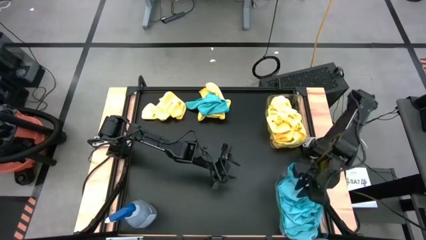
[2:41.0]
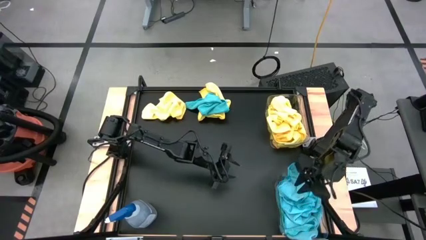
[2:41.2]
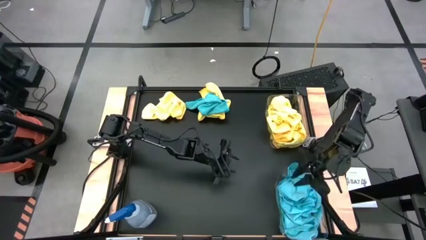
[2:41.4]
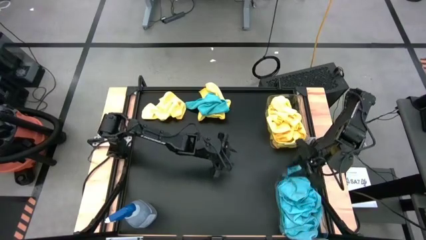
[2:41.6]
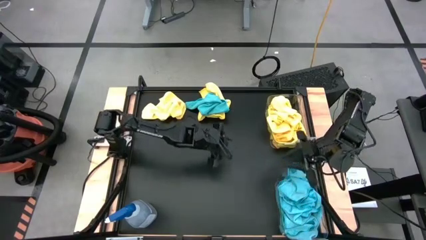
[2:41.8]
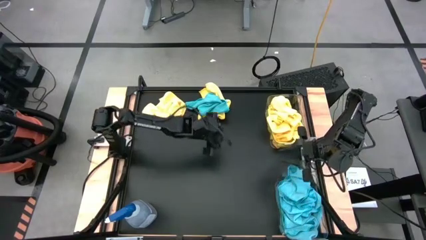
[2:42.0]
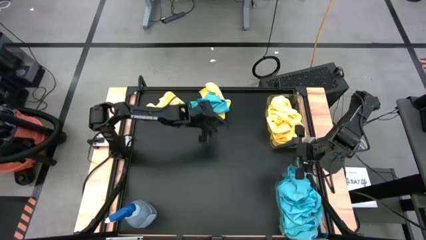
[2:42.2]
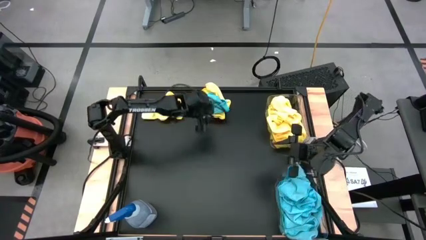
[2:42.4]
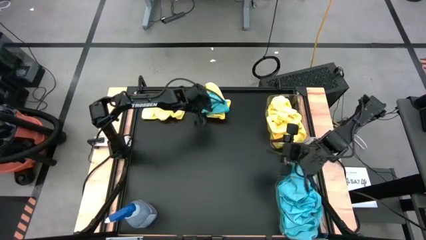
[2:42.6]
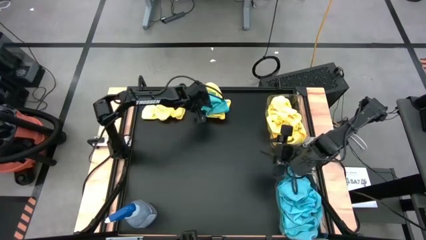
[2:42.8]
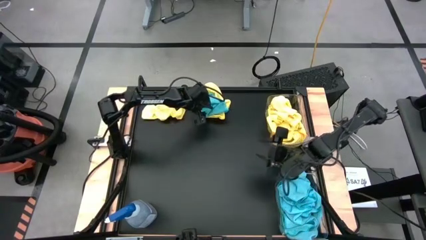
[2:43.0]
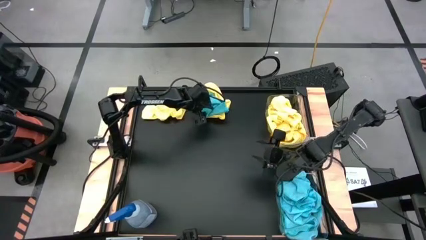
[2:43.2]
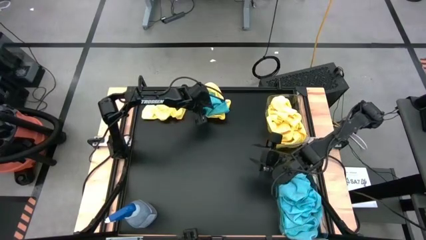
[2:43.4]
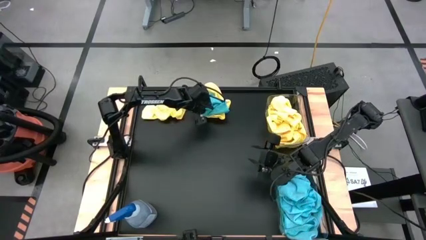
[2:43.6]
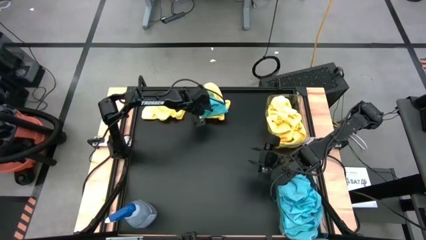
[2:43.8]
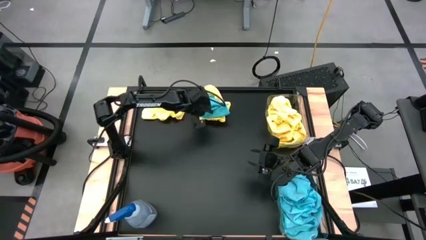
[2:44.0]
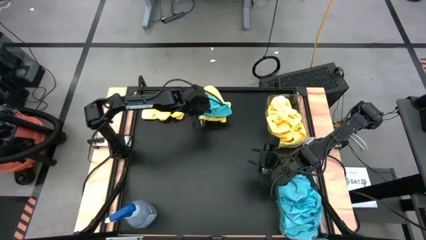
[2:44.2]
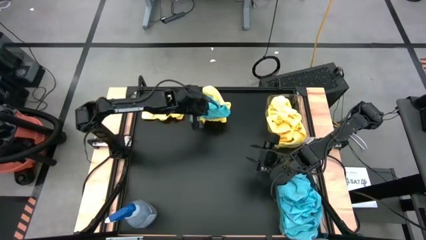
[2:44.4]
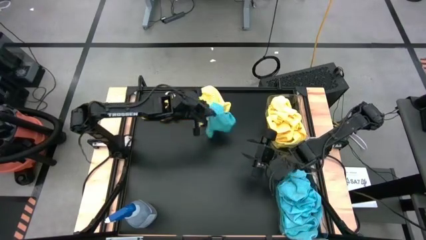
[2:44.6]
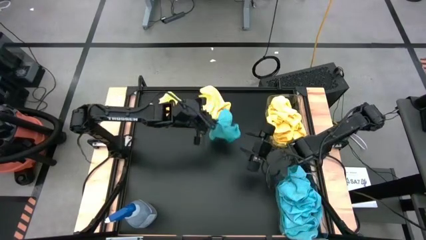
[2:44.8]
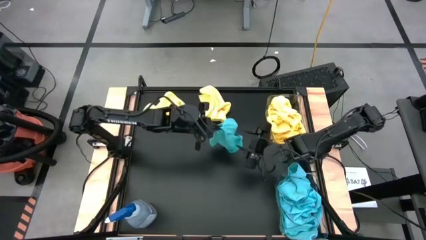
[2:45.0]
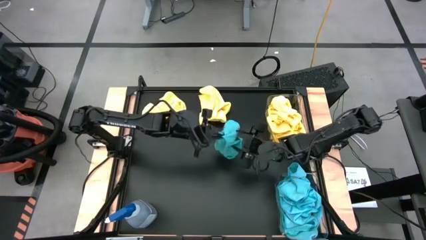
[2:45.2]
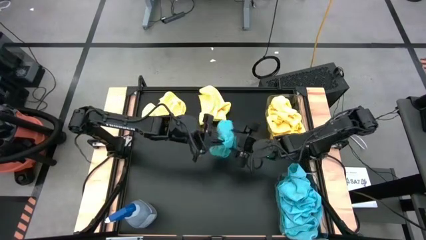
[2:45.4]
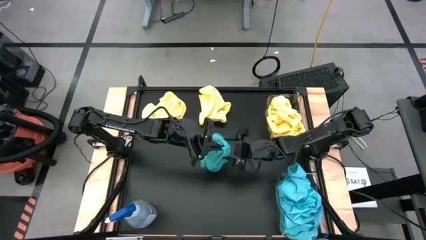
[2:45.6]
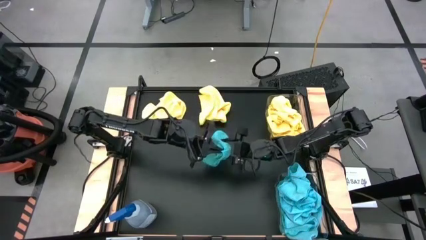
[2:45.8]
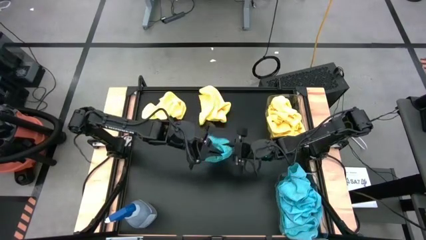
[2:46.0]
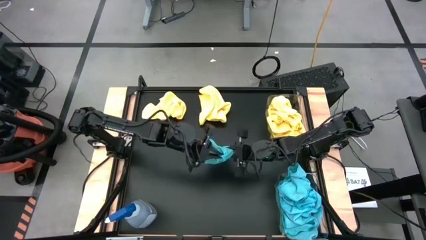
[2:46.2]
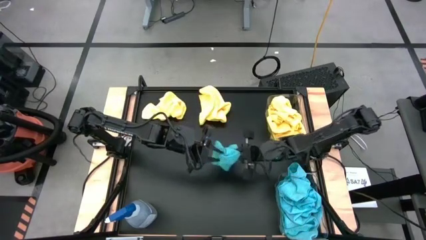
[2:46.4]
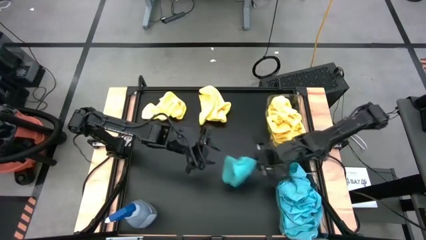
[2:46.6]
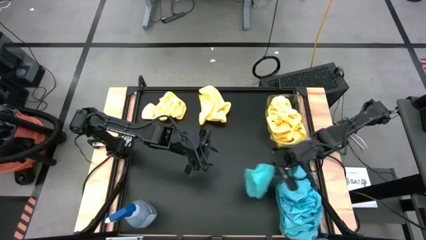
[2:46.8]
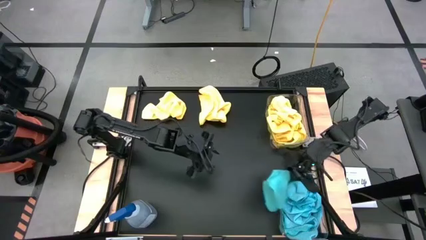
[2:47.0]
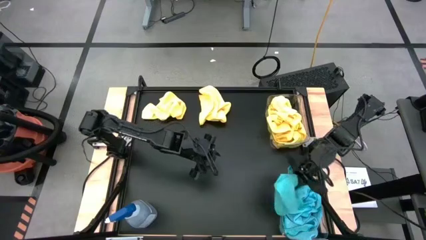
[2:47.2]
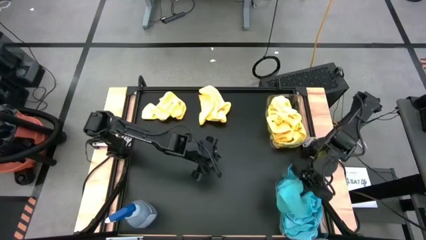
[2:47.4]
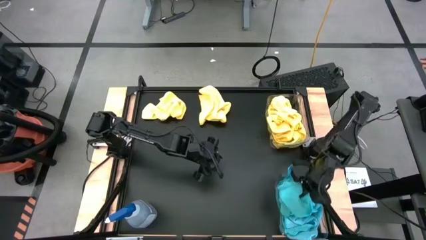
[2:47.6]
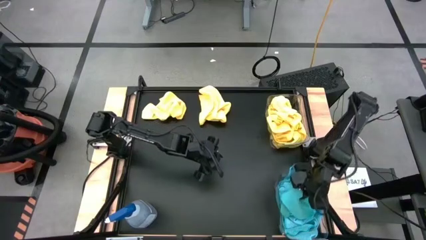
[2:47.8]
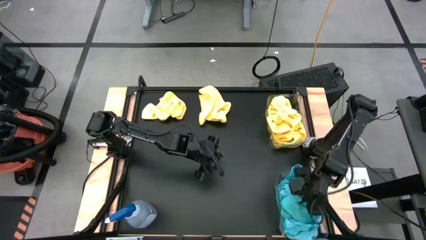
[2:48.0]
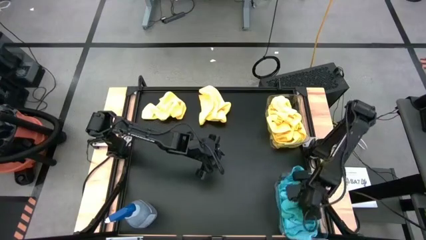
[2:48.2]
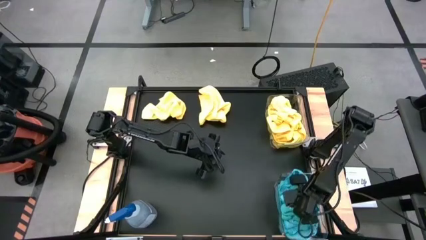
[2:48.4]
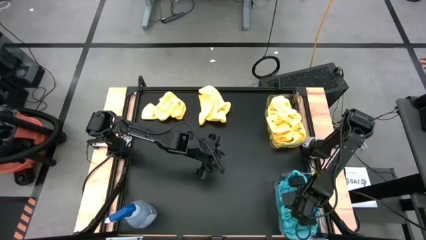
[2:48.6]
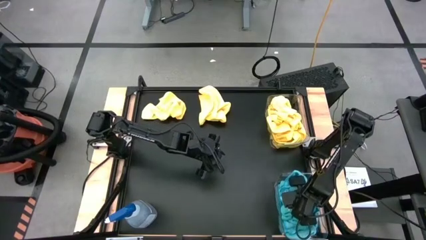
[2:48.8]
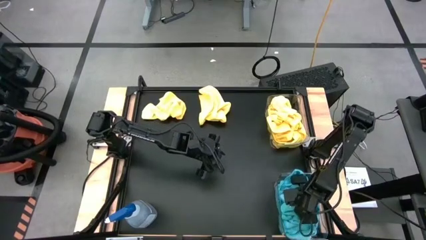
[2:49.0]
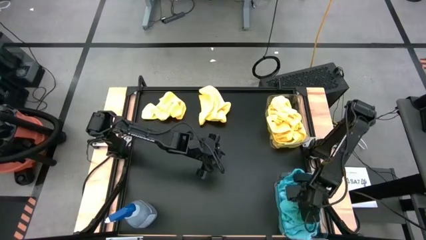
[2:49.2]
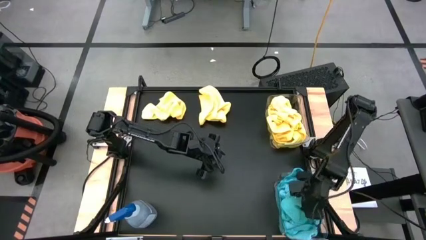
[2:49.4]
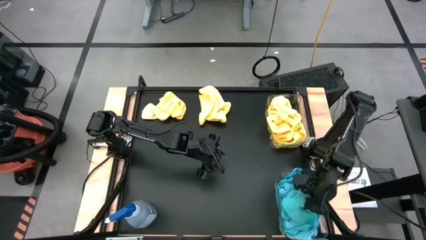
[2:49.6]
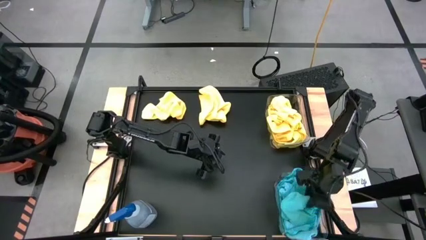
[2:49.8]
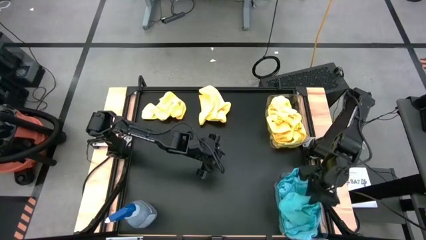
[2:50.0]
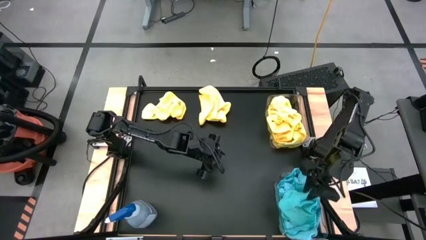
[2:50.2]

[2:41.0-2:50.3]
Task: Sort microfiber towel by color & place in baskets
Put the blue towel into the bottom transparent bin

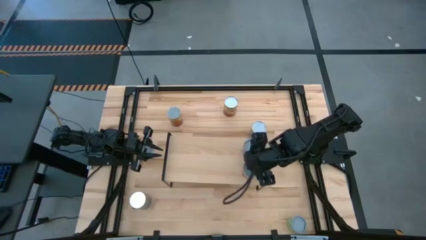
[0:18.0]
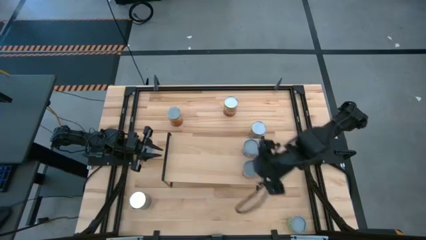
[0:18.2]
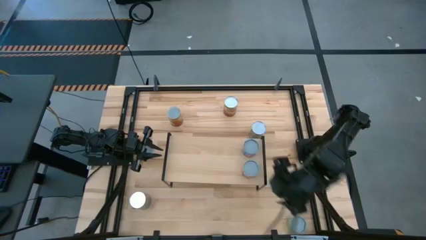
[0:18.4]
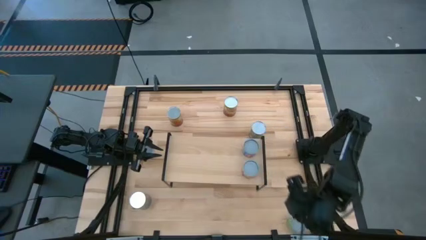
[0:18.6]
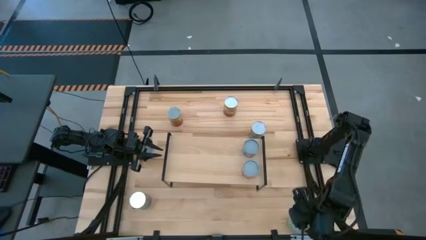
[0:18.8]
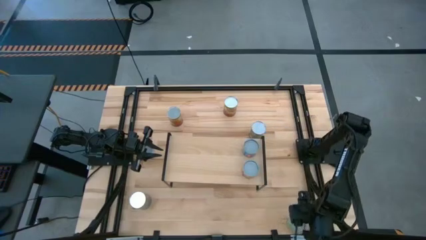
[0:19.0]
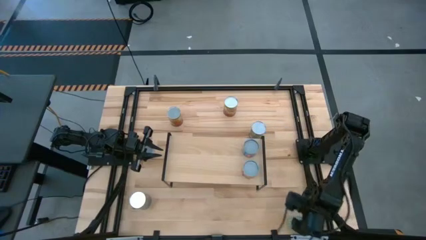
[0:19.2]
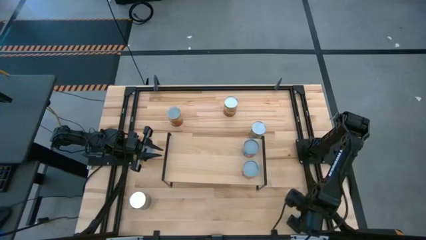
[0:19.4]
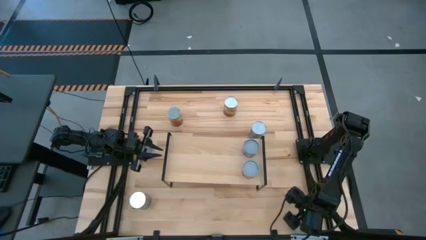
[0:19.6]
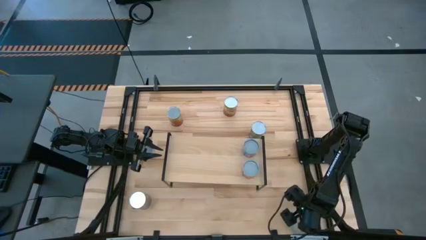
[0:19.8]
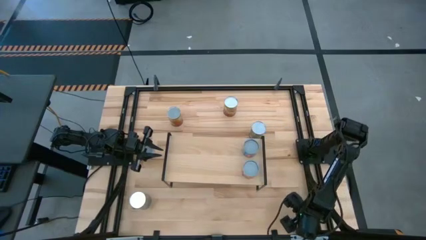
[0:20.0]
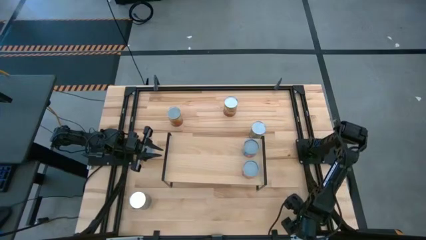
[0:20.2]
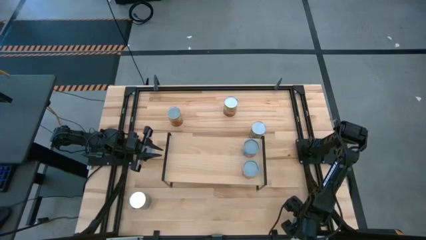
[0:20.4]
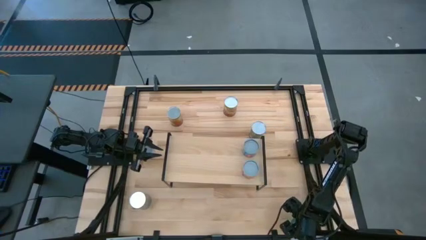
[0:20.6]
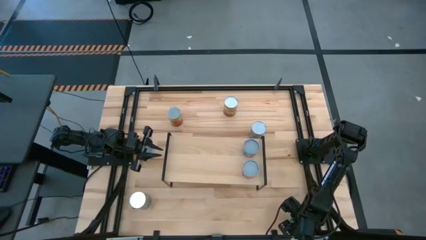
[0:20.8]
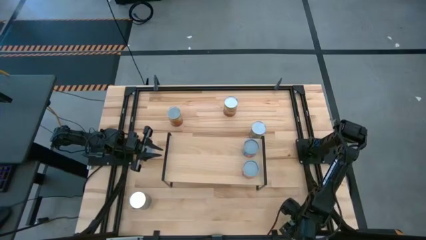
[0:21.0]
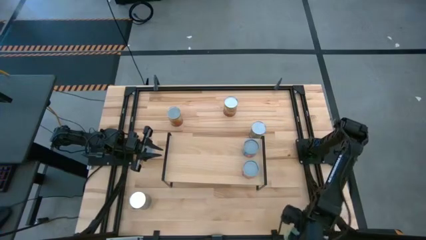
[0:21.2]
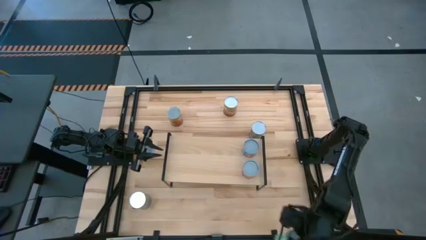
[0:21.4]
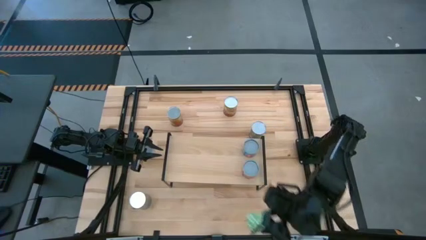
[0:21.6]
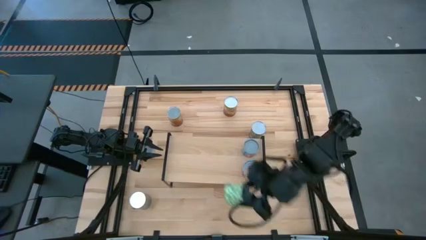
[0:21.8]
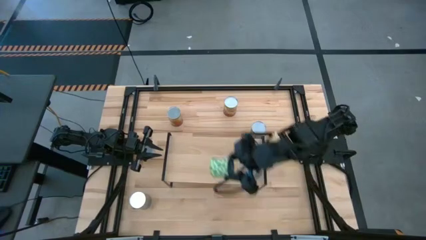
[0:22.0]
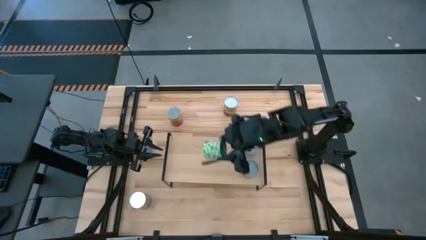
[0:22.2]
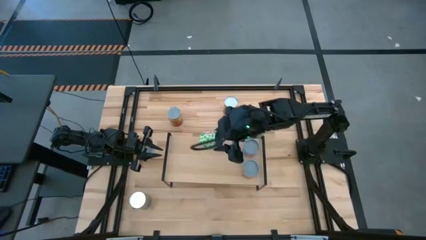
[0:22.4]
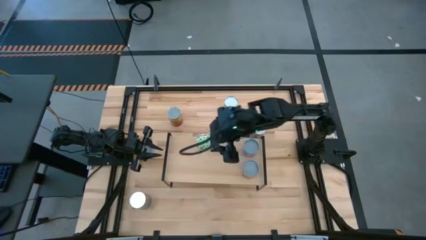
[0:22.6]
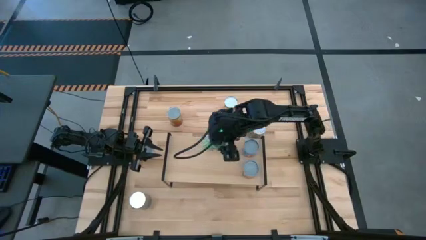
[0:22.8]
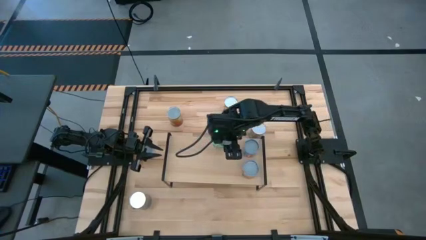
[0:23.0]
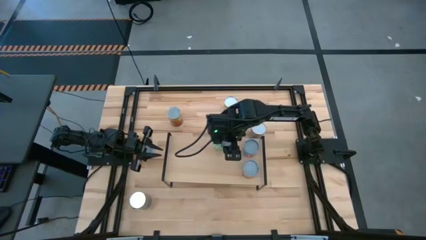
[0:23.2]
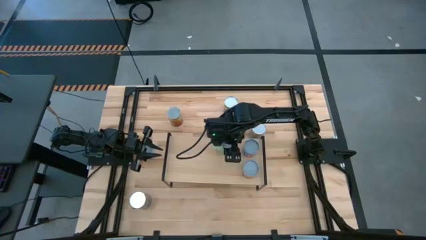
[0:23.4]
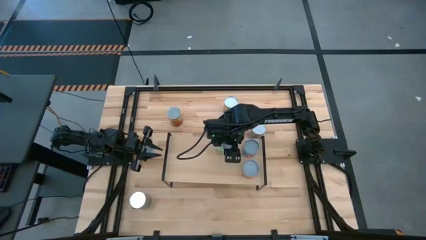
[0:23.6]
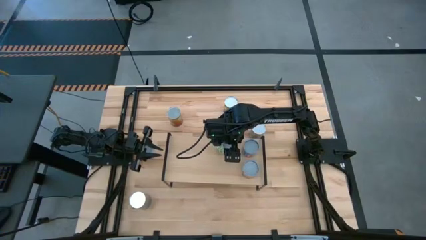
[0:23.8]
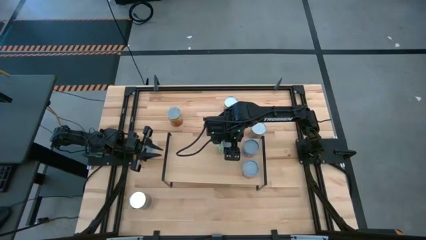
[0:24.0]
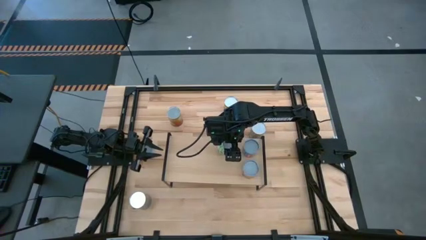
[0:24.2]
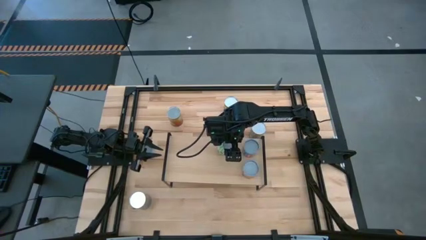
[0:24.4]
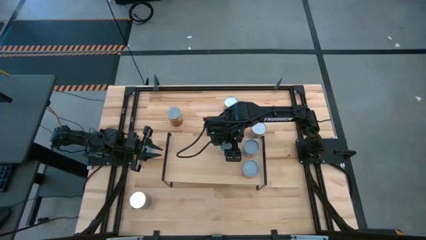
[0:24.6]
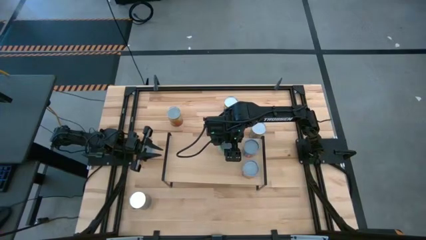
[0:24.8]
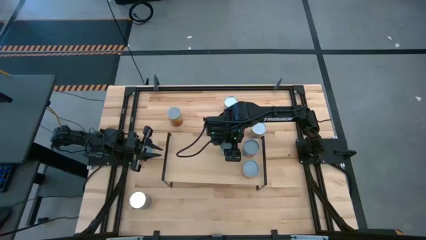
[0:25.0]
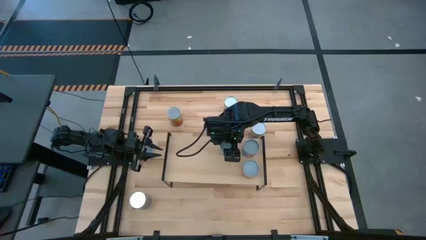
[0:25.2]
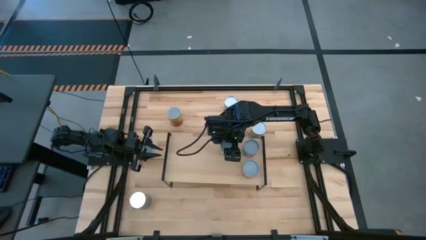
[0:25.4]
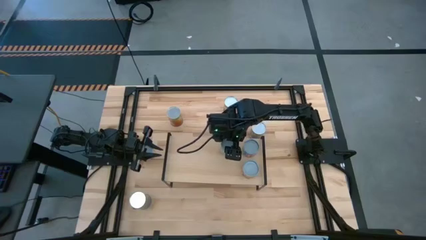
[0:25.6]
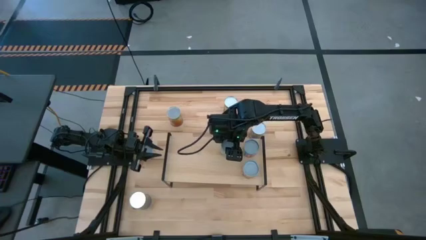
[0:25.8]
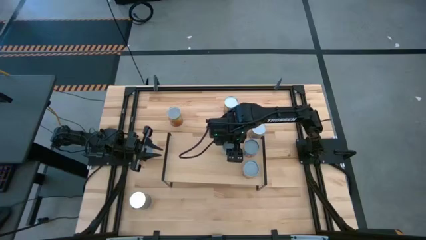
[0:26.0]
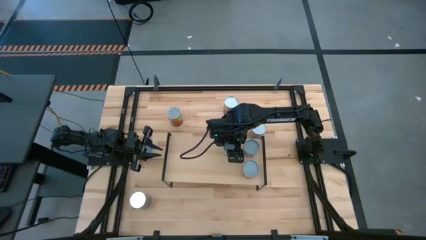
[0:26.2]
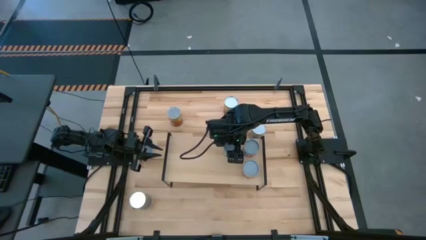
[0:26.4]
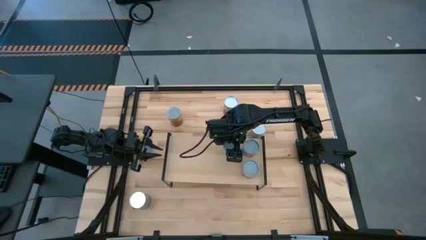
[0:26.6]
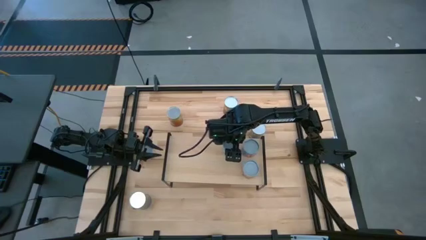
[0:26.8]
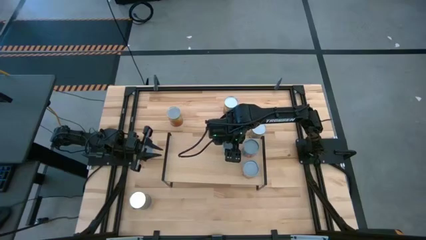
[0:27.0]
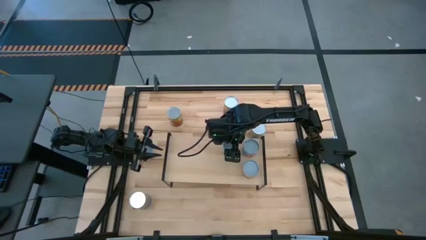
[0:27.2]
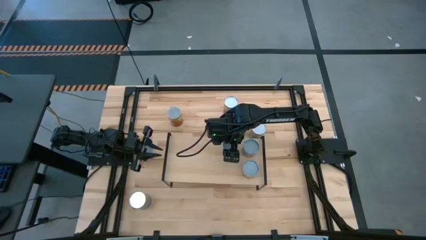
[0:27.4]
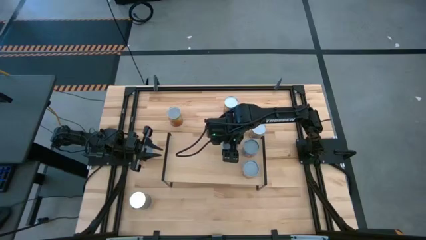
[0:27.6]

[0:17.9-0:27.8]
Task: Pick and place cans onto a shelf
Put the small canned peas on the shelf
